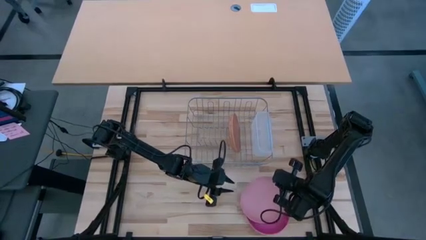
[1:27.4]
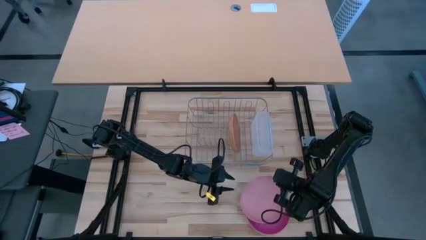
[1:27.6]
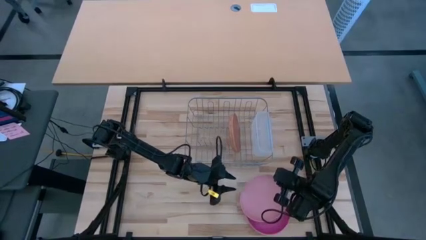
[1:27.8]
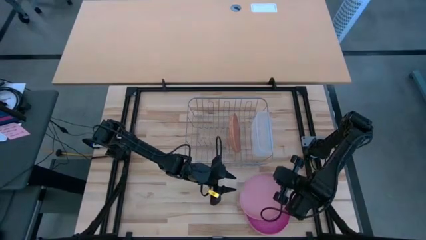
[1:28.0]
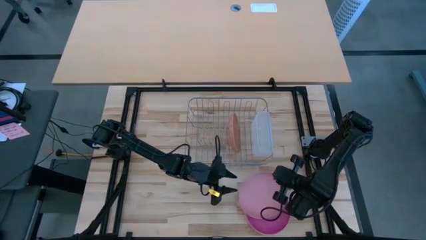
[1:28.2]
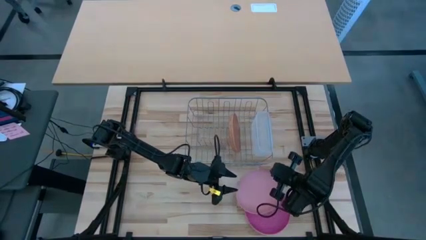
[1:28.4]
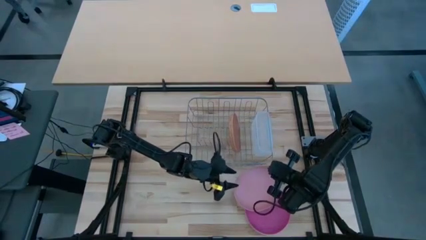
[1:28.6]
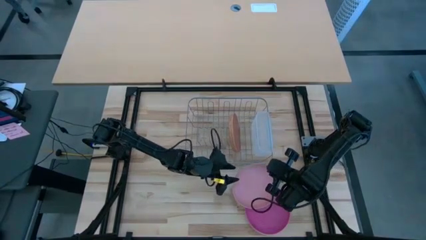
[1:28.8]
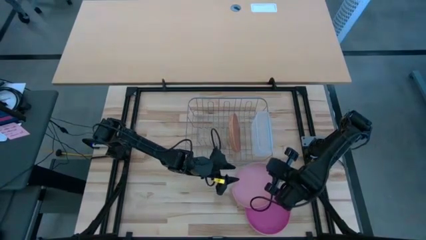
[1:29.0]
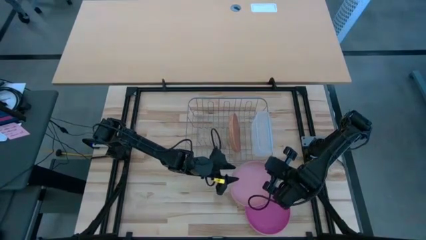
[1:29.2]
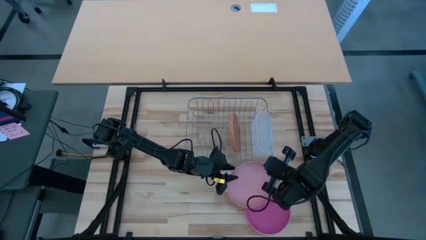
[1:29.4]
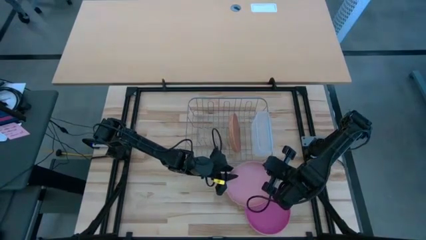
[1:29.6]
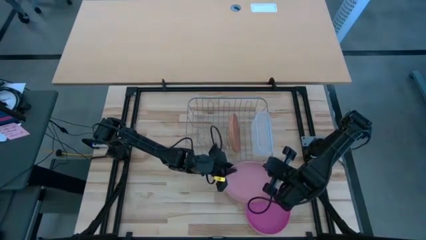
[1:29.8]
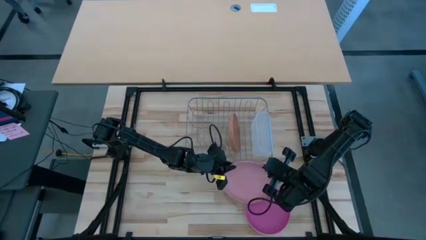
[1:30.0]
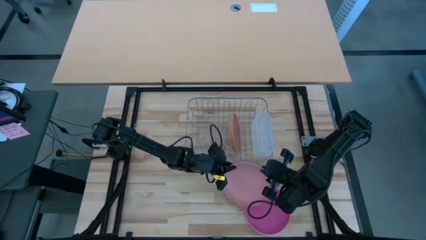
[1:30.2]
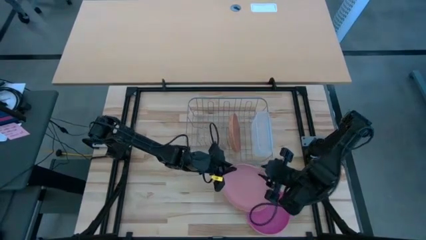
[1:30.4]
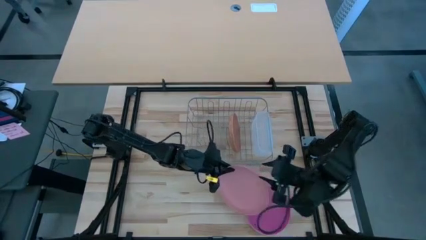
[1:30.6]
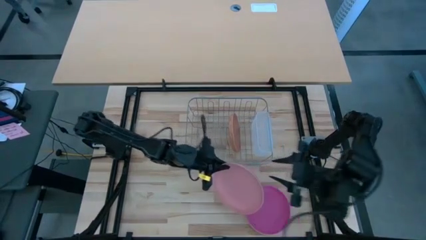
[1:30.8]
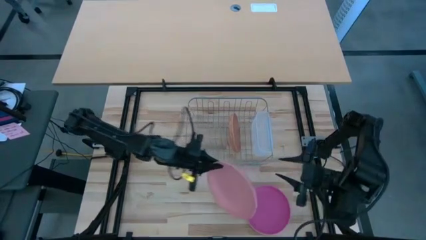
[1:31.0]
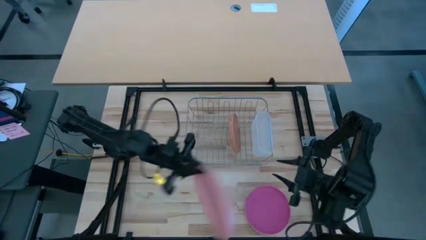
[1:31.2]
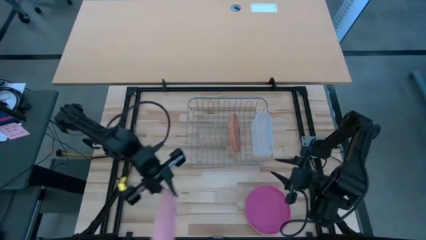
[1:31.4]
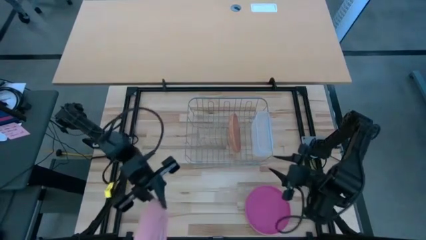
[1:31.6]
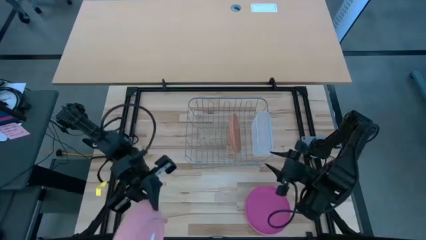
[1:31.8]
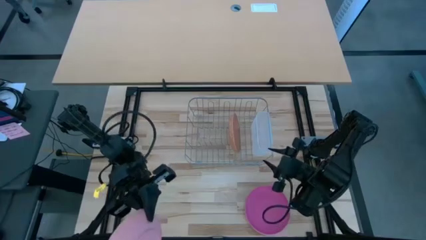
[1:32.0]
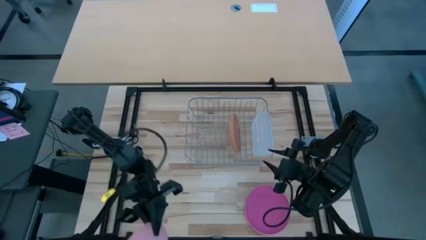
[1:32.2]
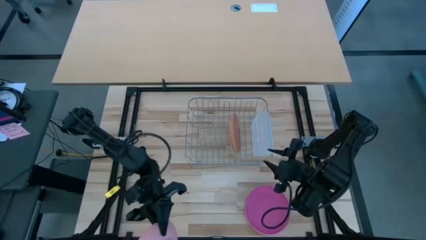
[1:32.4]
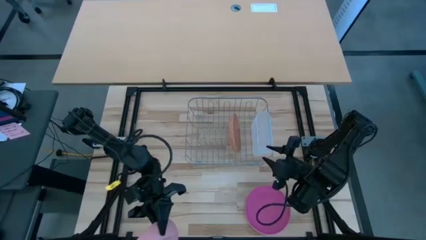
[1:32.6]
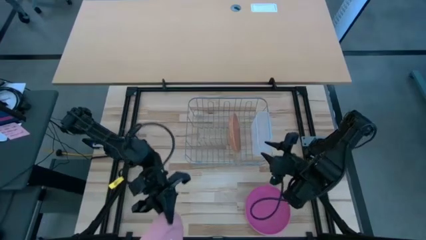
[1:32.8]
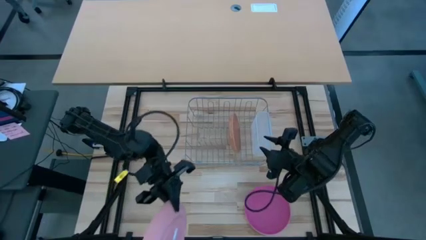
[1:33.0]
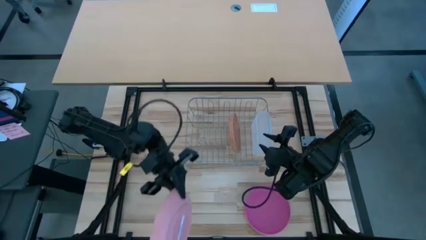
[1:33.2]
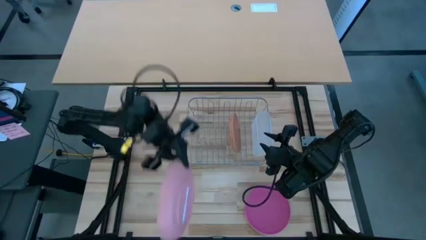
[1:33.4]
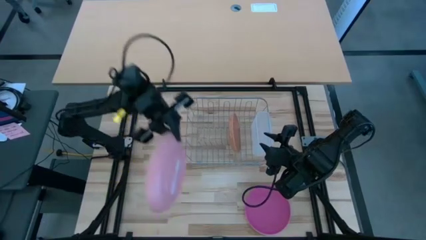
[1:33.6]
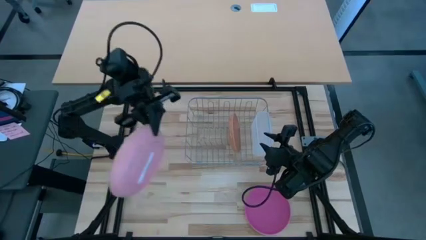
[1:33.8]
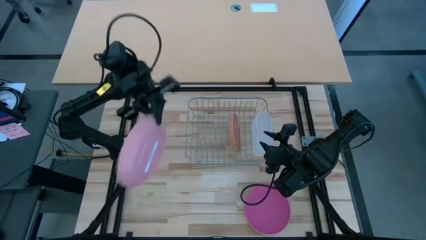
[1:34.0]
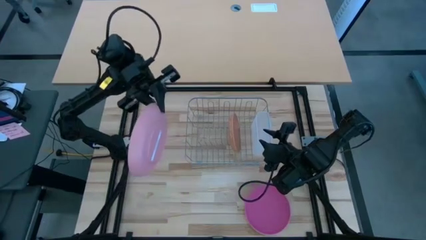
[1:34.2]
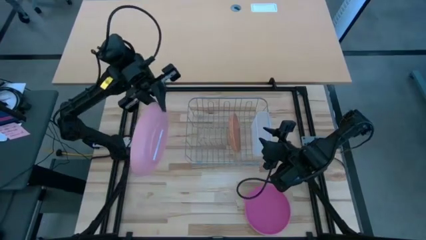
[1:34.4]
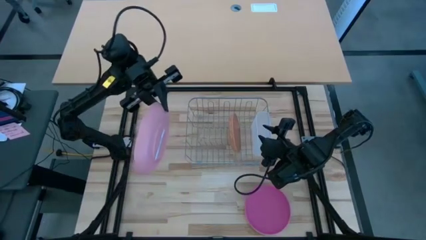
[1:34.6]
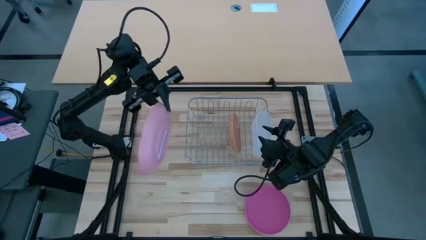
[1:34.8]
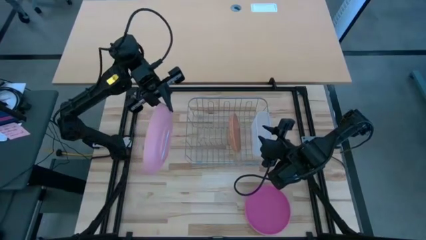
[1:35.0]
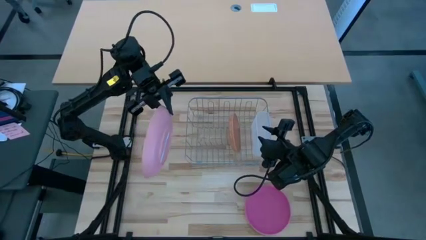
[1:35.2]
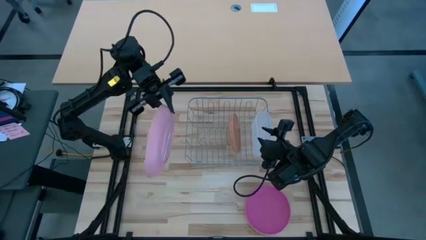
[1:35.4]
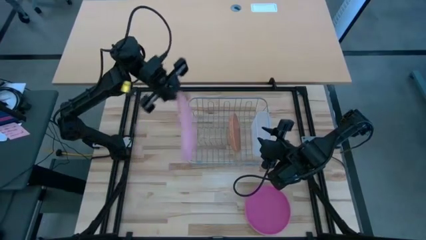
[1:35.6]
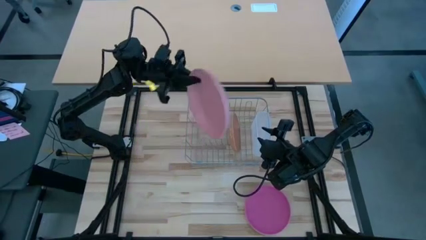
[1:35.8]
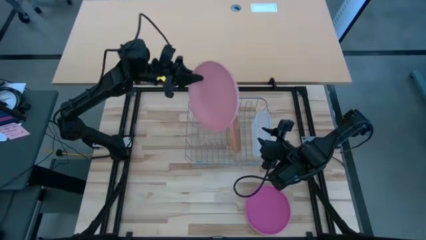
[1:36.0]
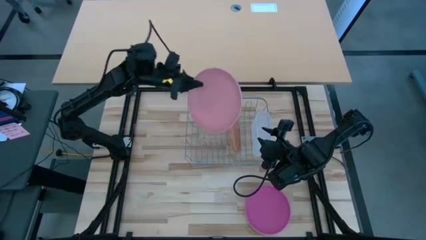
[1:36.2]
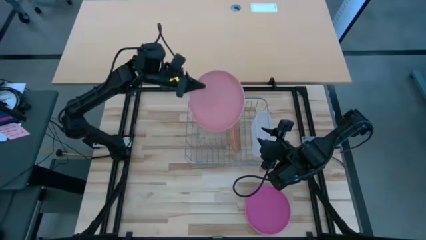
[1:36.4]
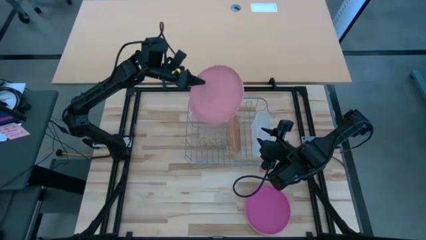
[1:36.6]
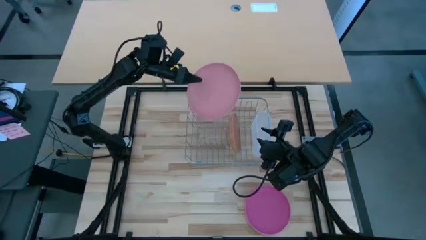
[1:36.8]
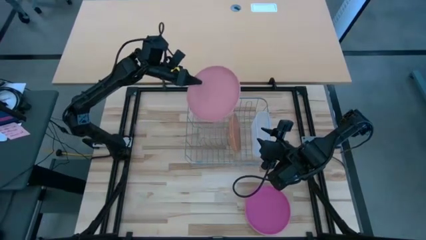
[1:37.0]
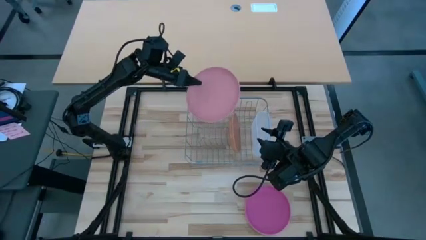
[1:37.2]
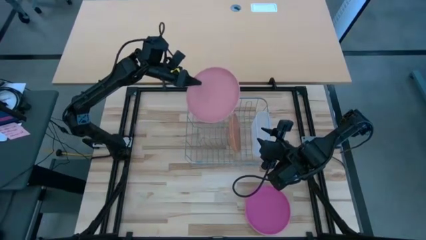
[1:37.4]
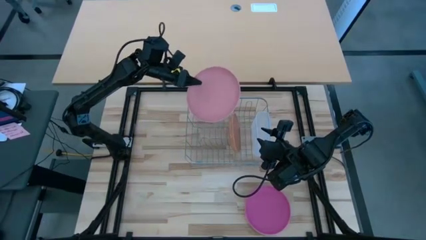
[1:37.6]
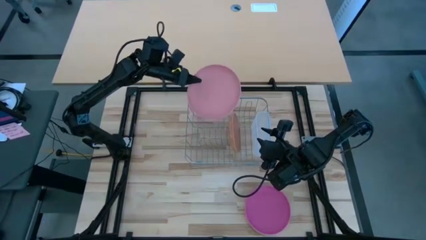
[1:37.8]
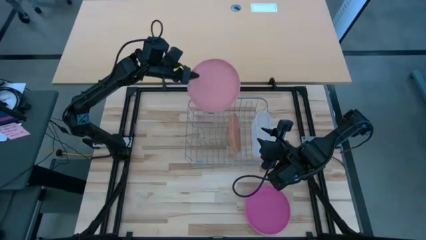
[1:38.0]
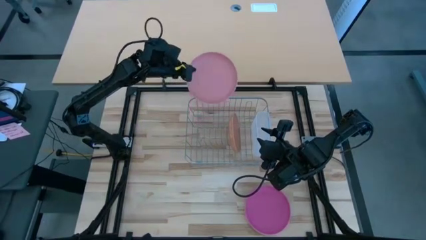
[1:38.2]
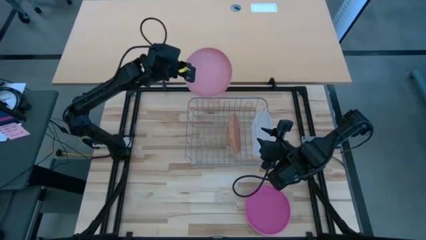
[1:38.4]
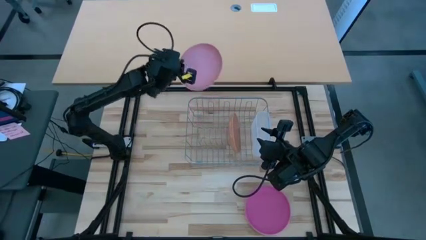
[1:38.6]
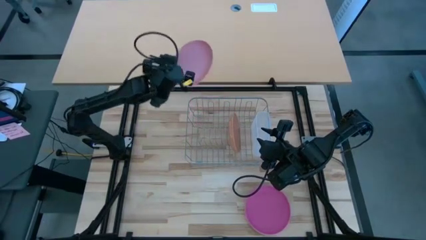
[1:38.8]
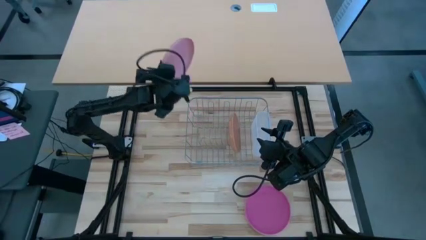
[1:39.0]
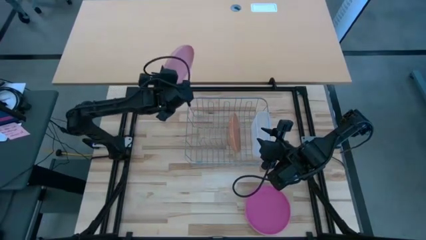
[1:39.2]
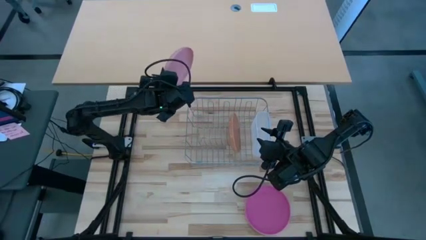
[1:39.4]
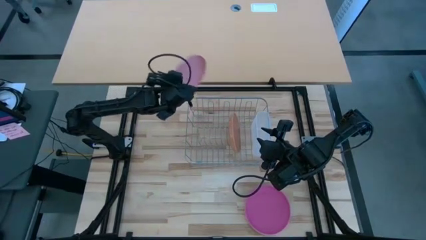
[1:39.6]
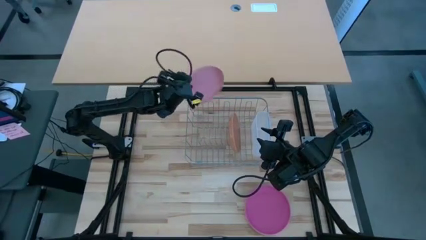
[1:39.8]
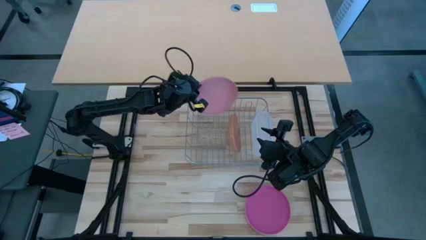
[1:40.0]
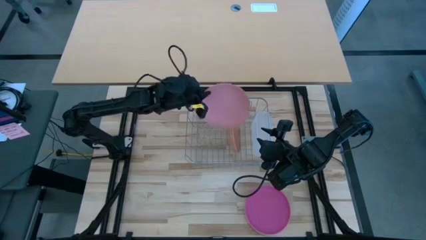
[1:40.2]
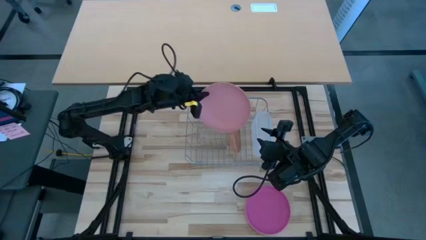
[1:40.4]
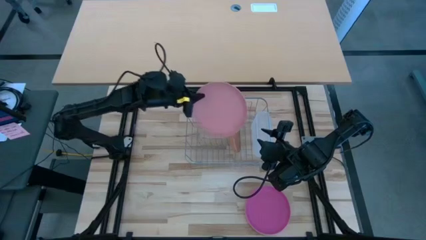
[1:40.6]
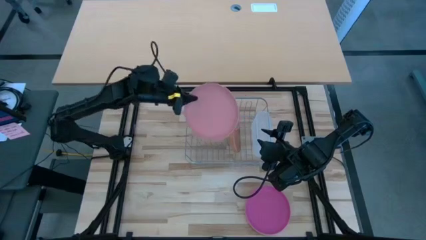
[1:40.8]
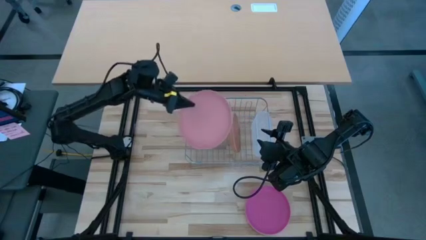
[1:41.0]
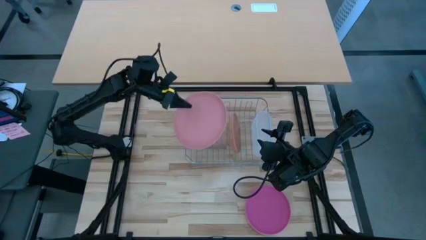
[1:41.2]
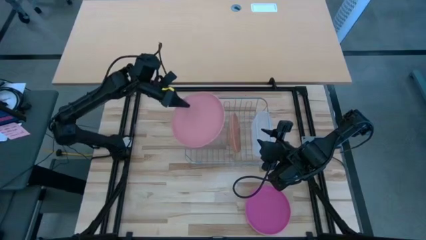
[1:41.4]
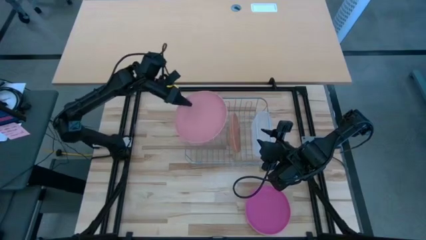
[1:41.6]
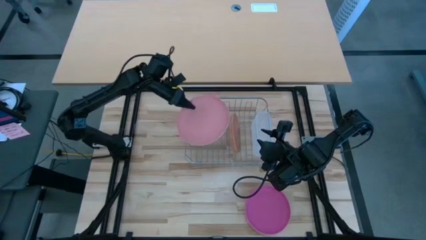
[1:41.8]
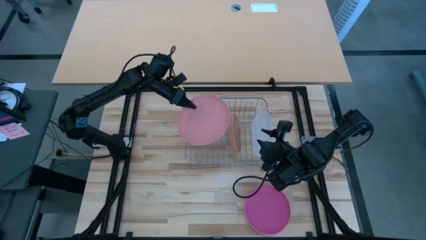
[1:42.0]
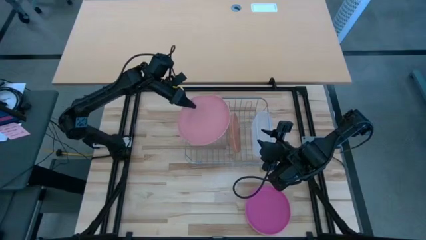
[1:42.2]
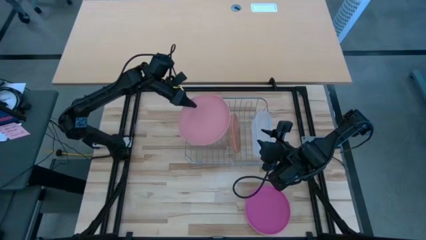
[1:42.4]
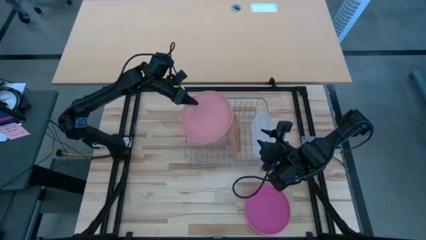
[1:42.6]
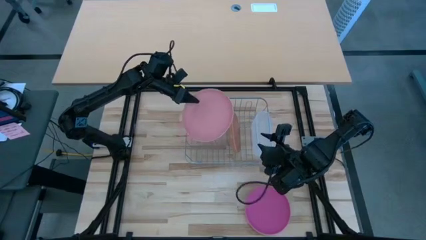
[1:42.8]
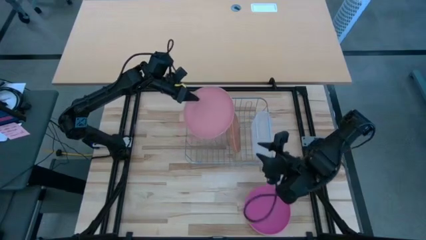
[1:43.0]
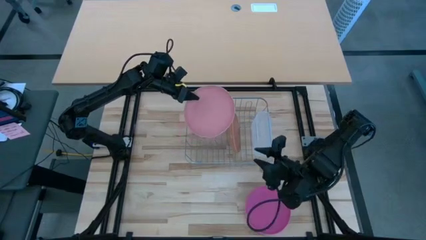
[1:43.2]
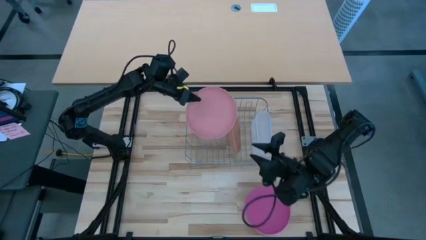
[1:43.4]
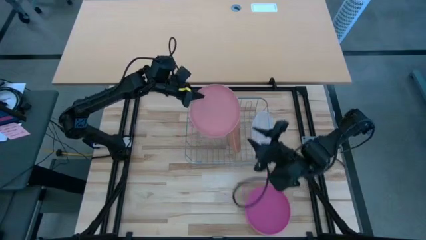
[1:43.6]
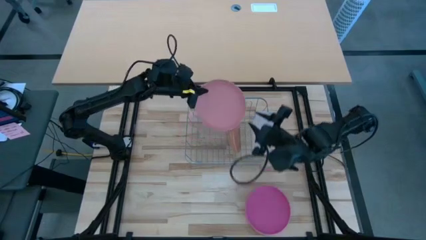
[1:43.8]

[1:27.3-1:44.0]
Task: Sort dishes
Put the light pink plate in the dish rack
